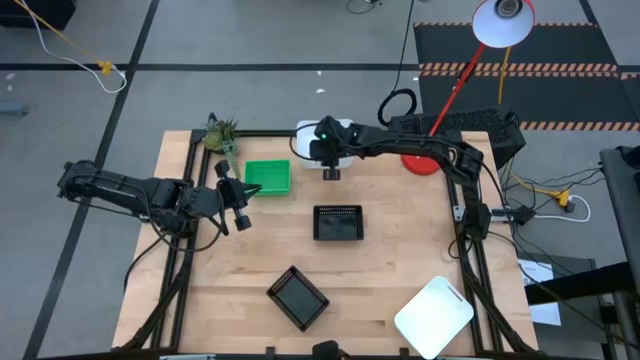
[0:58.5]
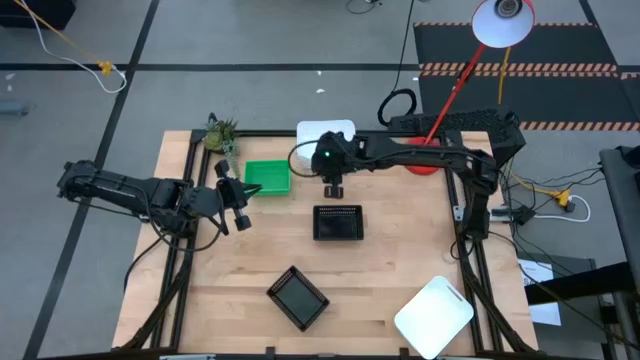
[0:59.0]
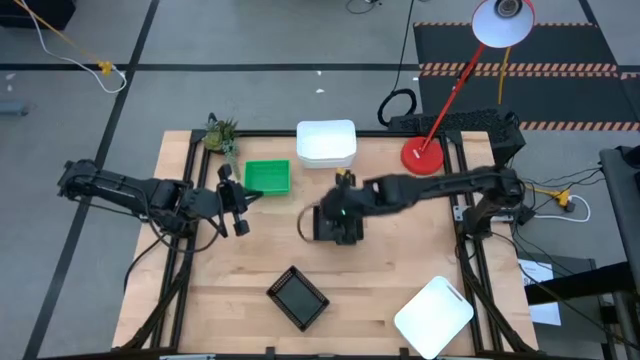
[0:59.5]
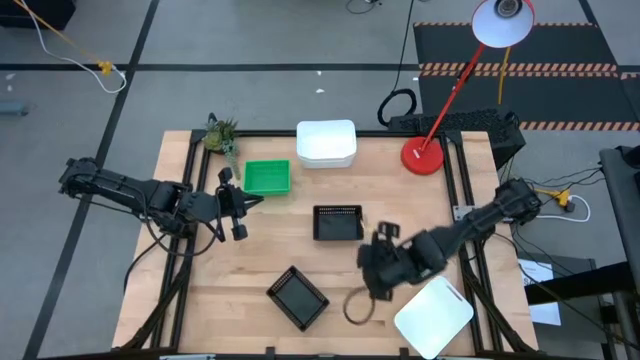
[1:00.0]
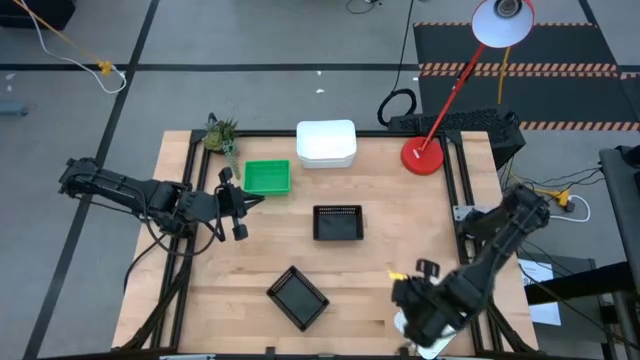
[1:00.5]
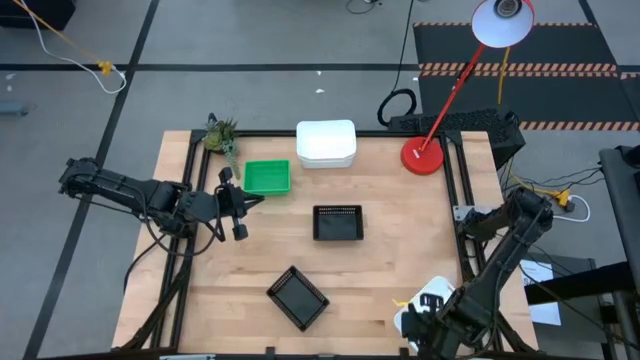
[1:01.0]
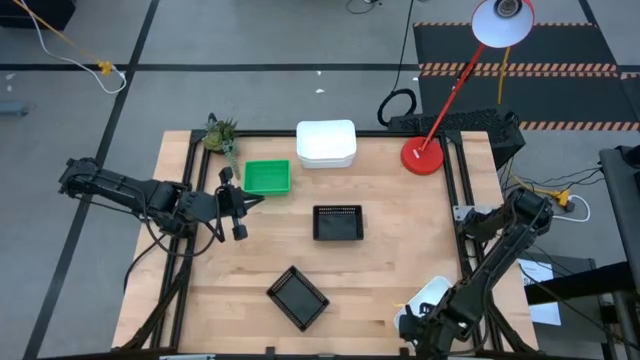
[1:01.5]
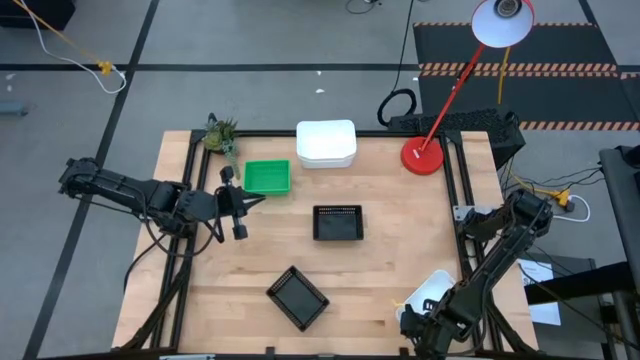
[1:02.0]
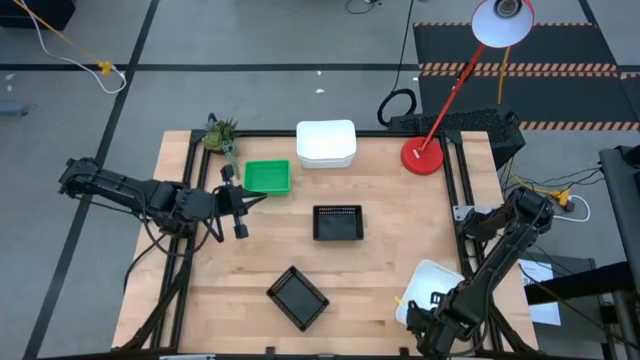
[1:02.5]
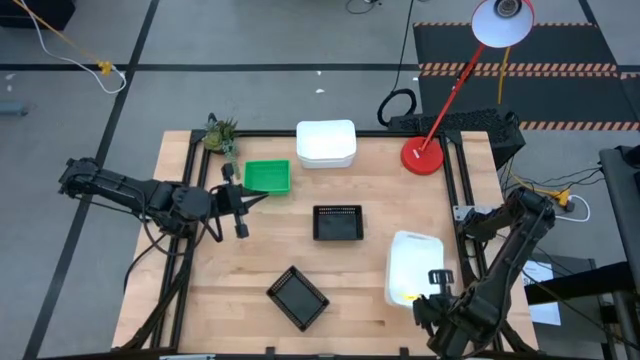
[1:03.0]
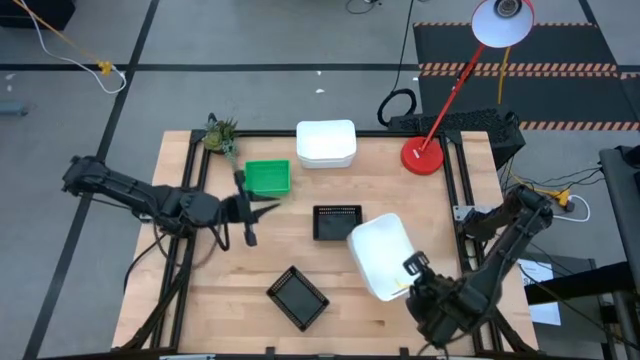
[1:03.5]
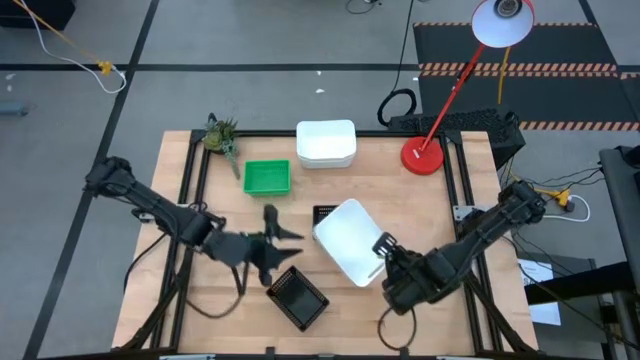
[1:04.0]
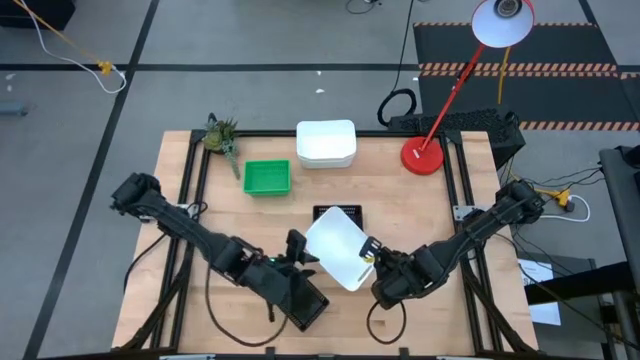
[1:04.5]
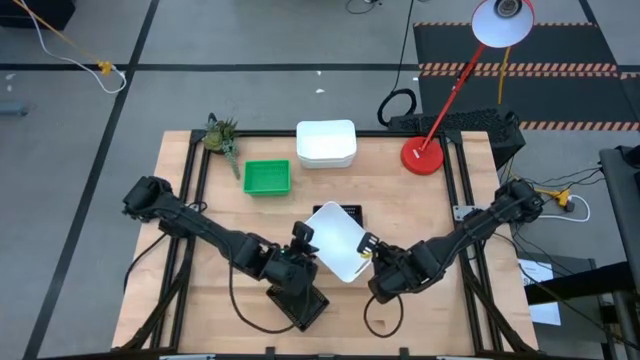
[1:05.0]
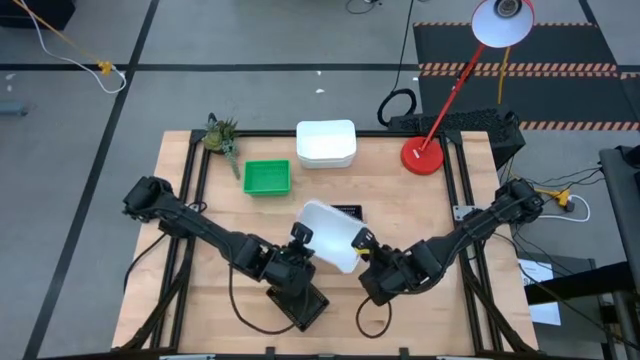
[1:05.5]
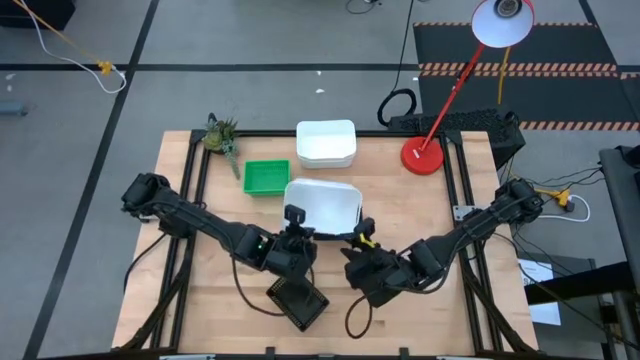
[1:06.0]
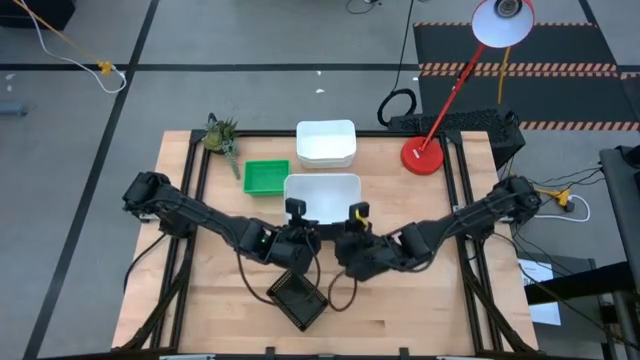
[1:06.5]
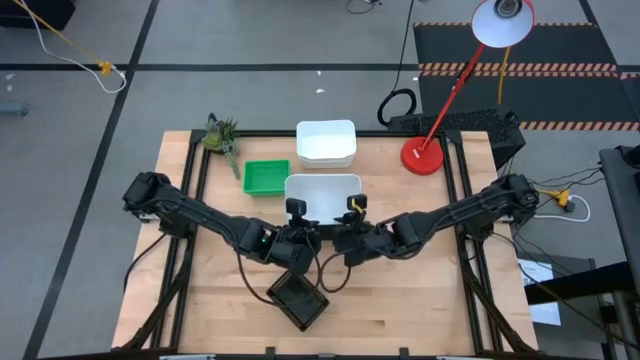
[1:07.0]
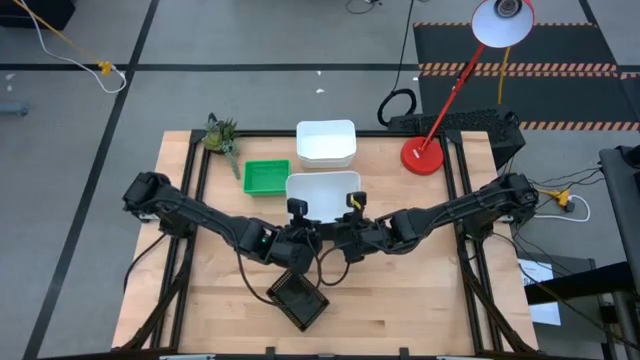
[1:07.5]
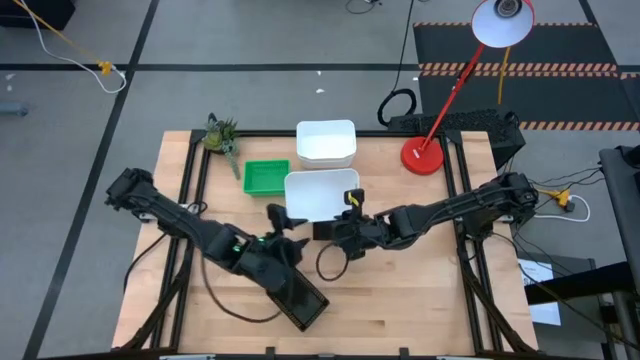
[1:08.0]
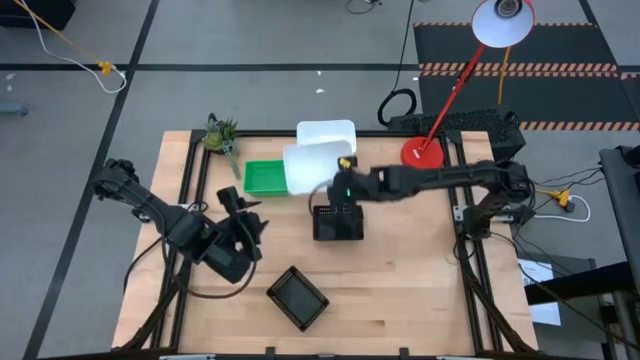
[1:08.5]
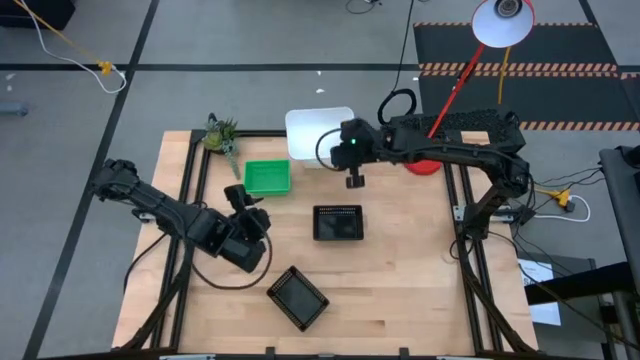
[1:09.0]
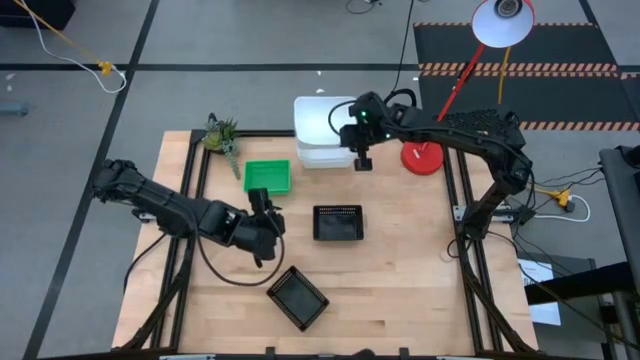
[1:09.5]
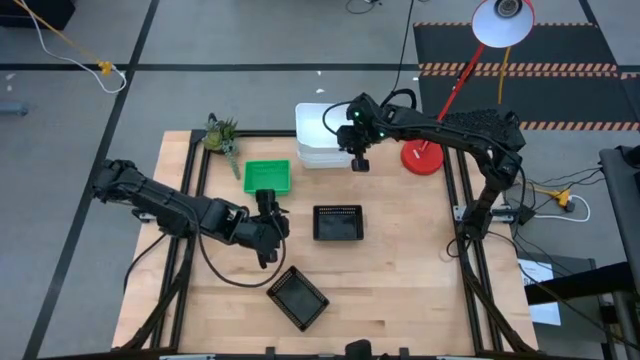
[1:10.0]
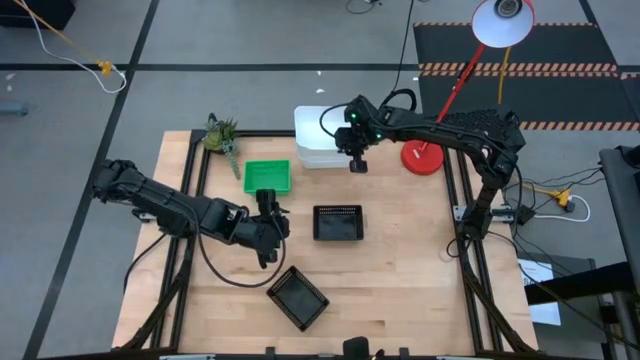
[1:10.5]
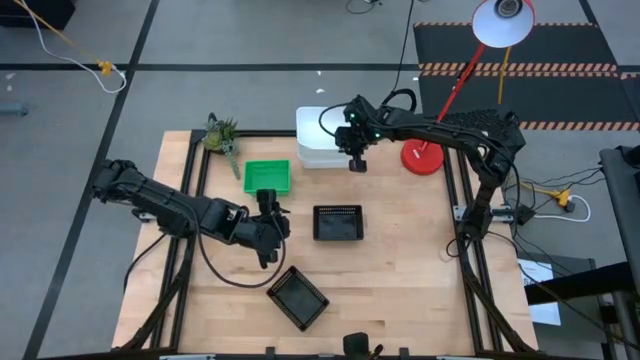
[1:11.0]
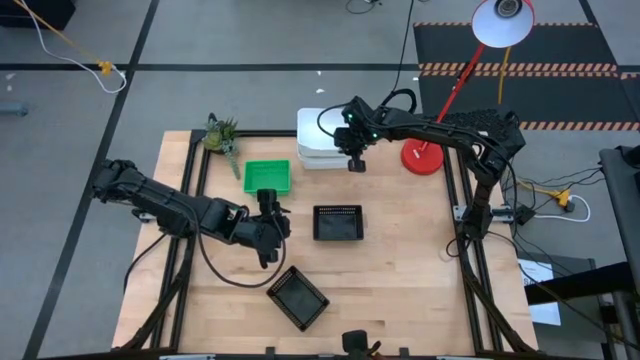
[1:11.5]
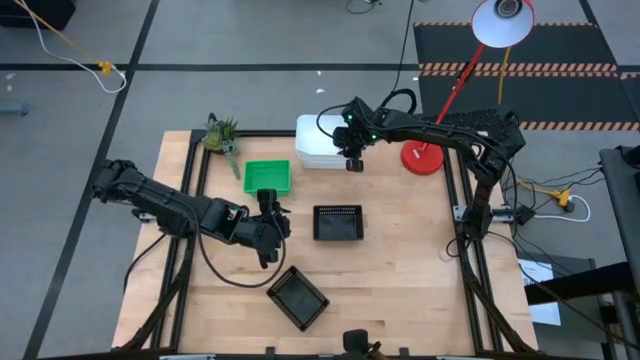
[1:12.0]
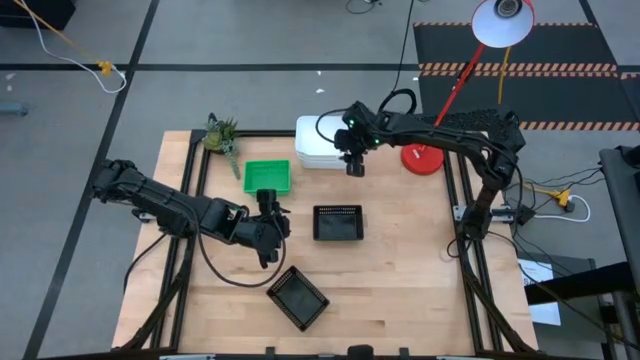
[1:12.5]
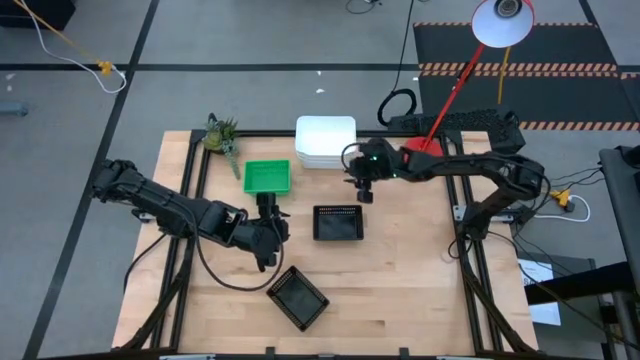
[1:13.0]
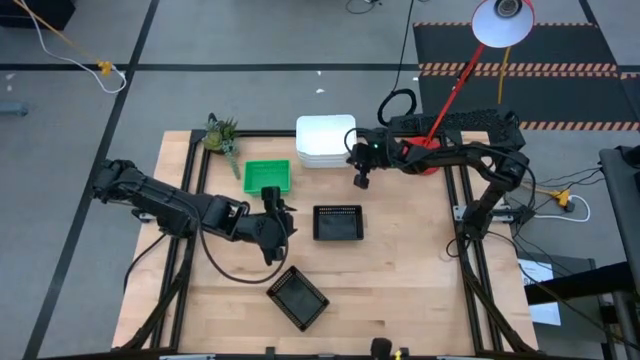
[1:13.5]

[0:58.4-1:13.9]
Stack the right white bin on the stacked white bins

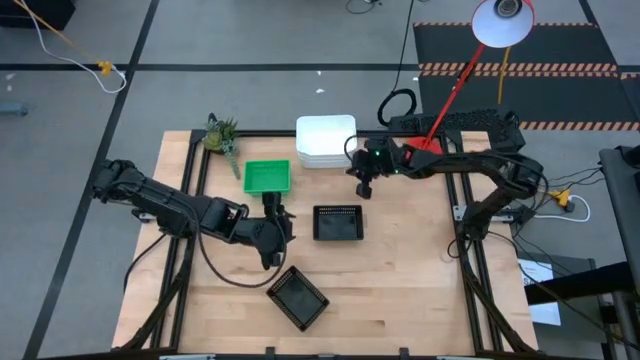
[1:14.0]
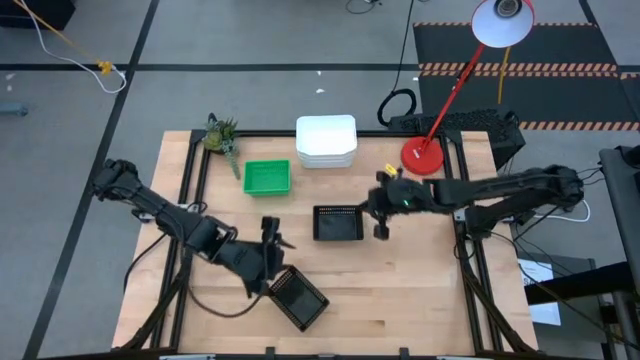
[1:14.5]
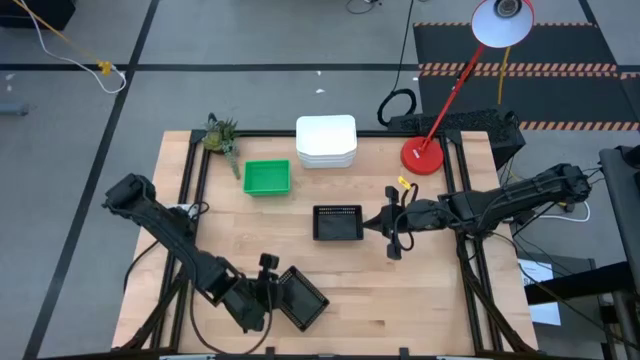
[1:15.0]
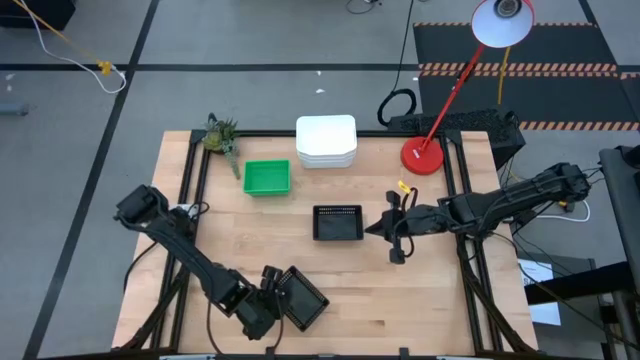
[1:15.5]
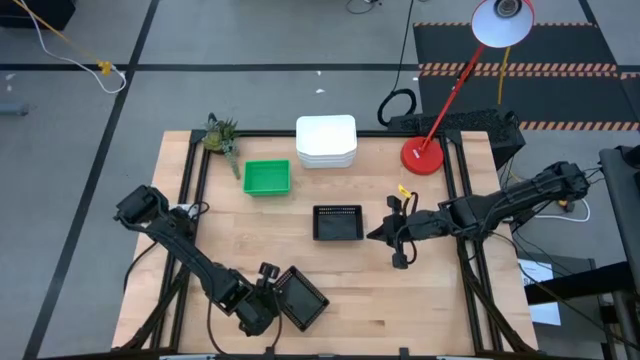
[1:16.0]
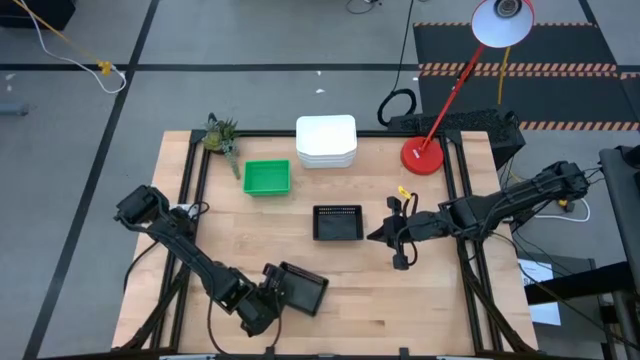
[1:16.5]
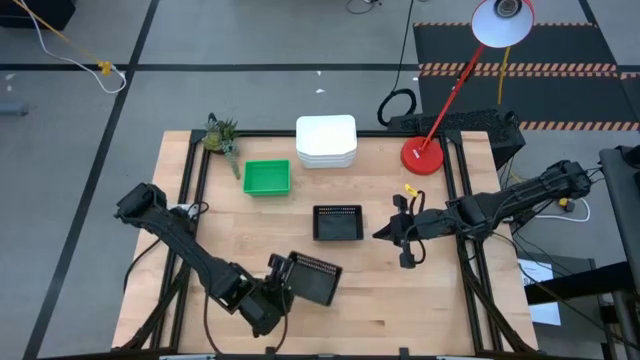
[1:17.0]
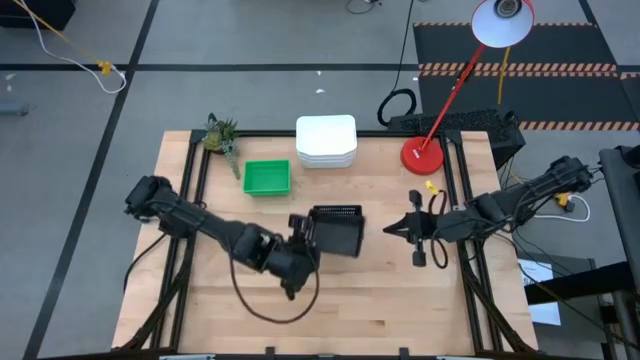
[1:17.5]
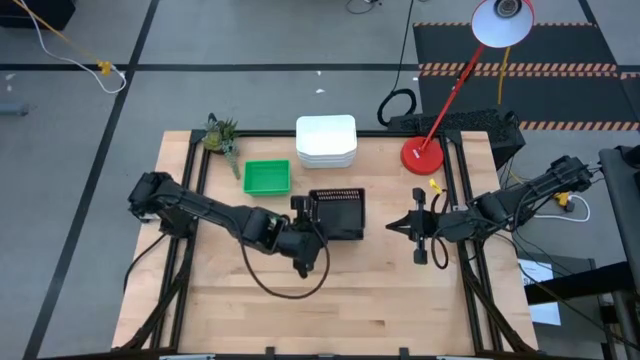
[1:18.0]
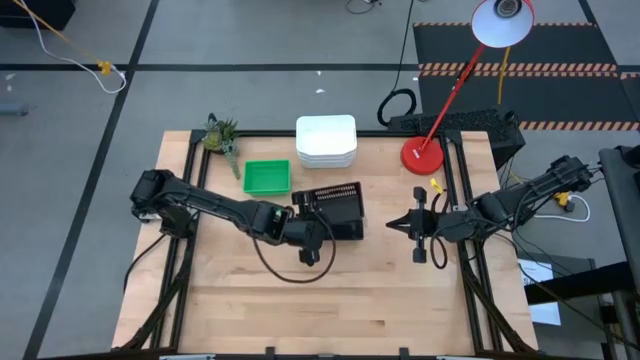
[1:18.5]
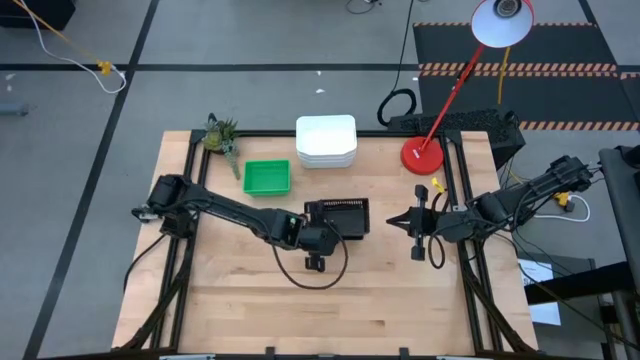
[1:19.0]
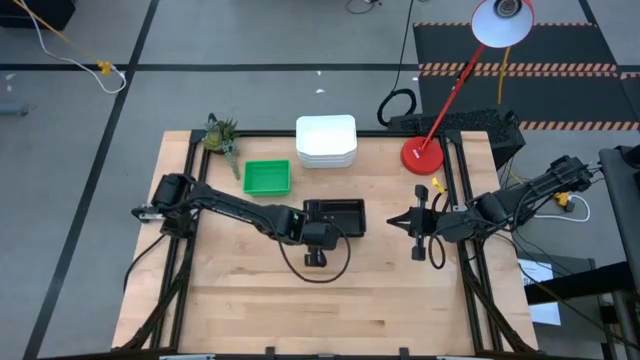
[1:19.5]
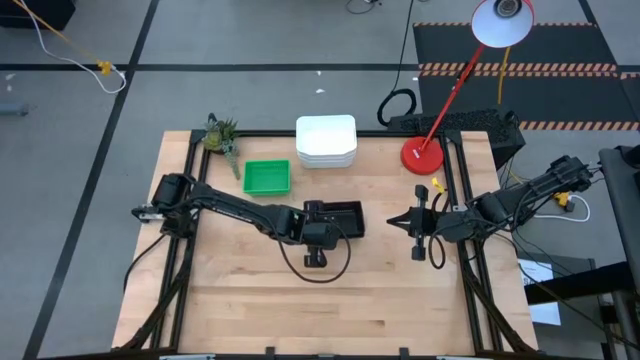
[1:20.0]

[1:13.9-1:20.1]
Stack the bottom black bin on the stacked black bins
